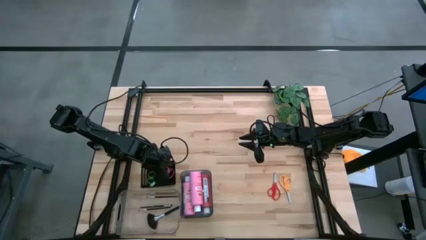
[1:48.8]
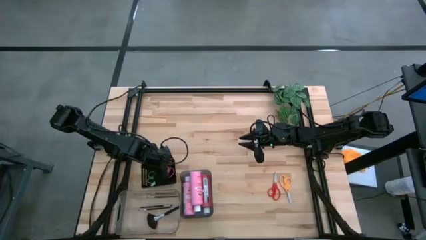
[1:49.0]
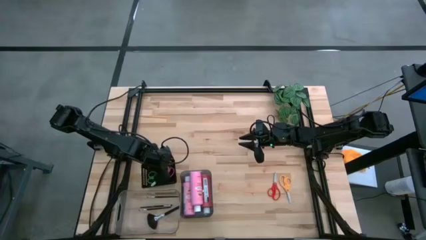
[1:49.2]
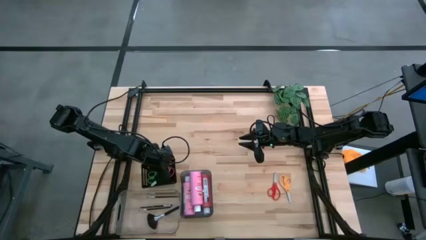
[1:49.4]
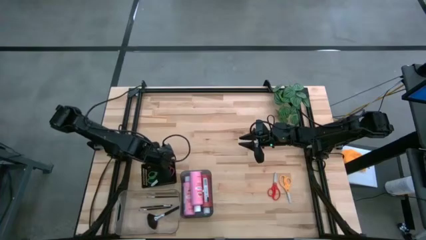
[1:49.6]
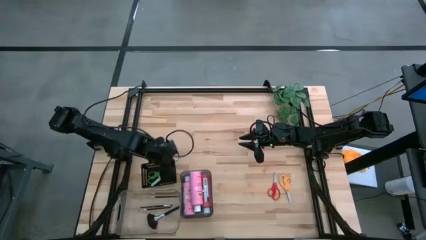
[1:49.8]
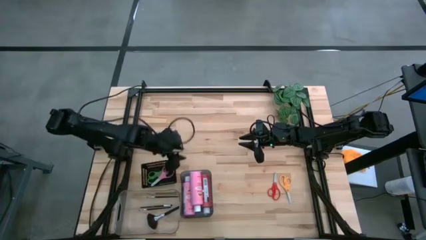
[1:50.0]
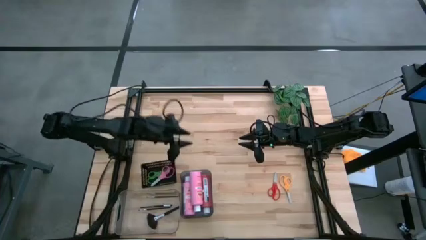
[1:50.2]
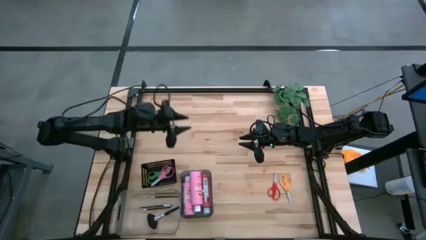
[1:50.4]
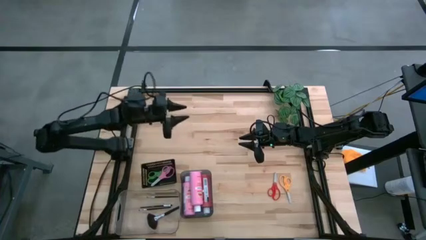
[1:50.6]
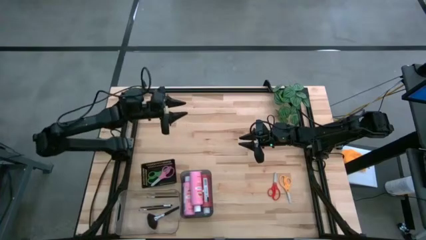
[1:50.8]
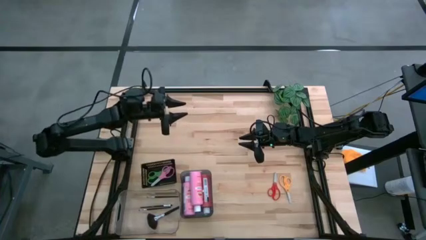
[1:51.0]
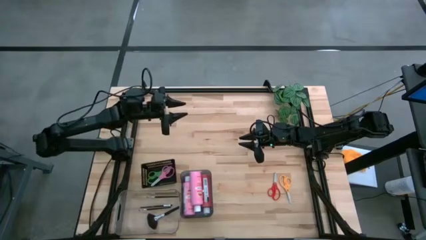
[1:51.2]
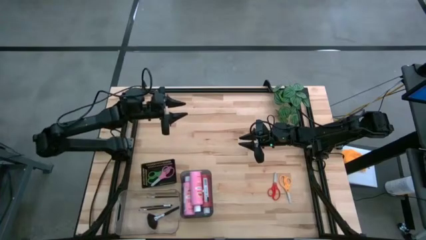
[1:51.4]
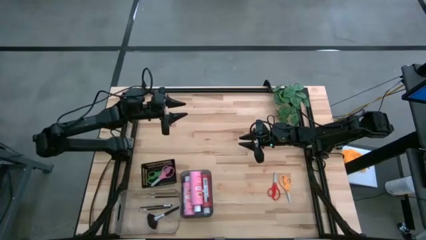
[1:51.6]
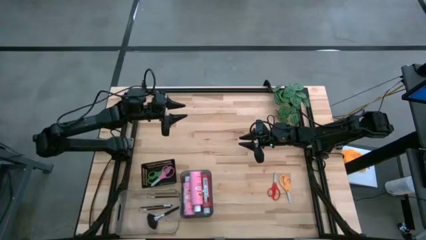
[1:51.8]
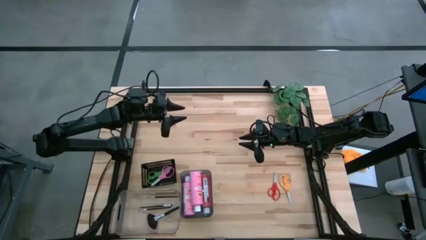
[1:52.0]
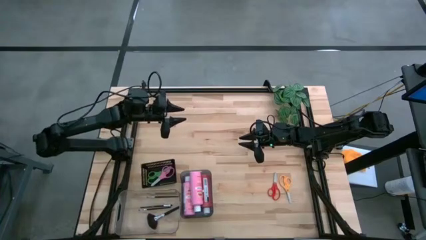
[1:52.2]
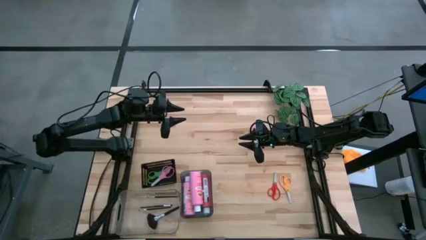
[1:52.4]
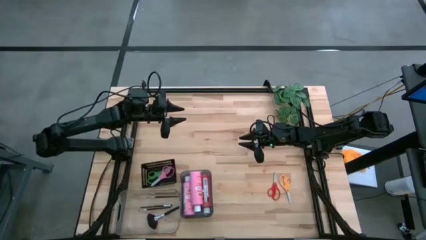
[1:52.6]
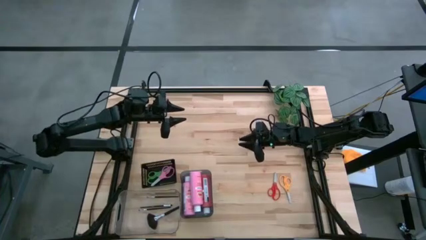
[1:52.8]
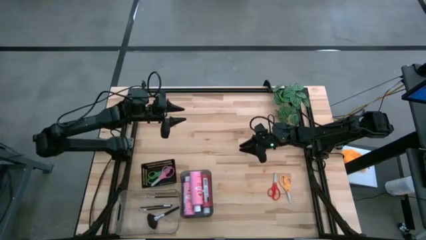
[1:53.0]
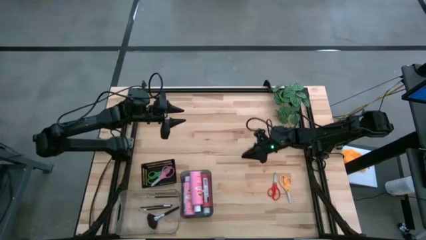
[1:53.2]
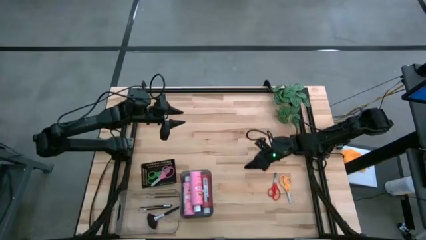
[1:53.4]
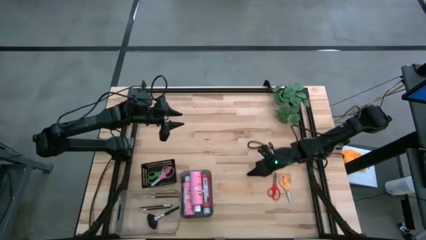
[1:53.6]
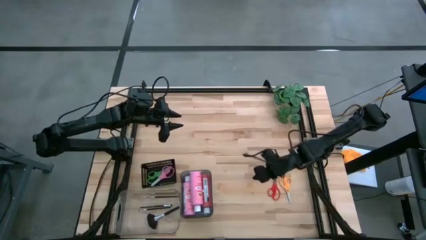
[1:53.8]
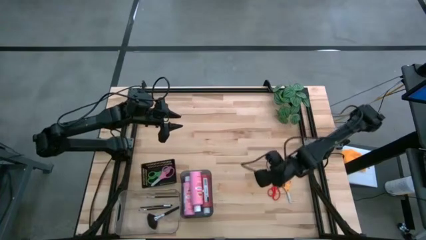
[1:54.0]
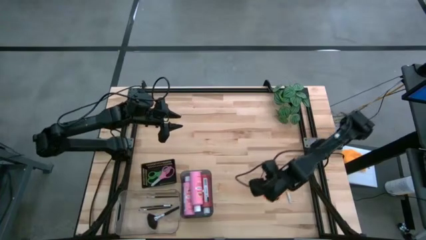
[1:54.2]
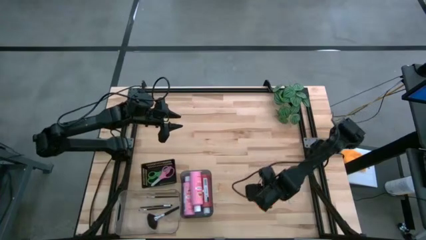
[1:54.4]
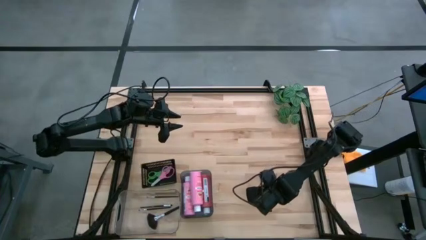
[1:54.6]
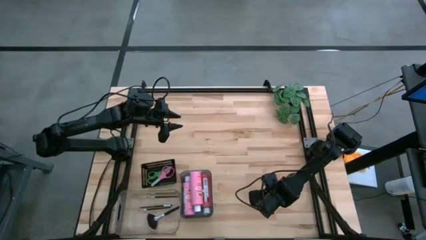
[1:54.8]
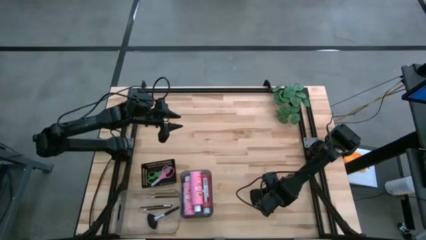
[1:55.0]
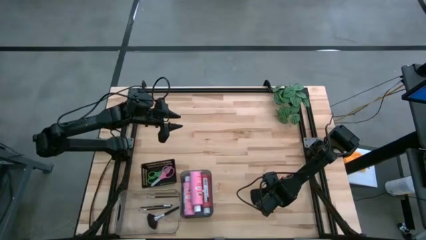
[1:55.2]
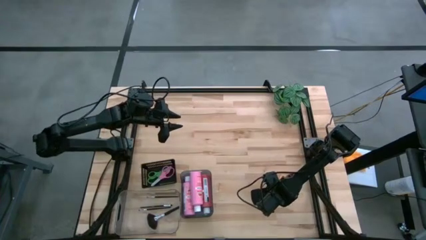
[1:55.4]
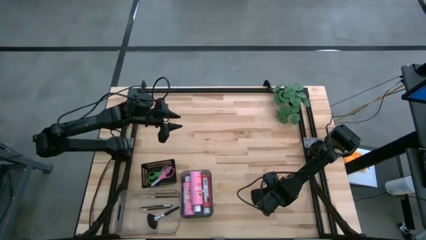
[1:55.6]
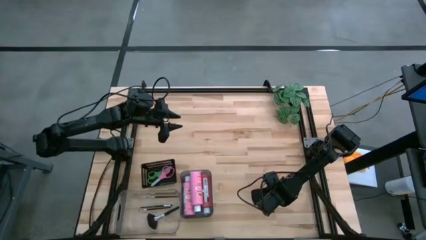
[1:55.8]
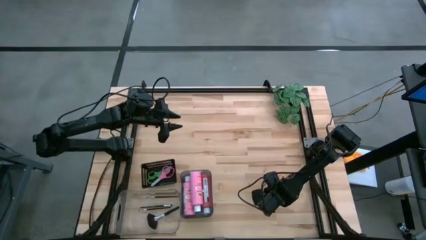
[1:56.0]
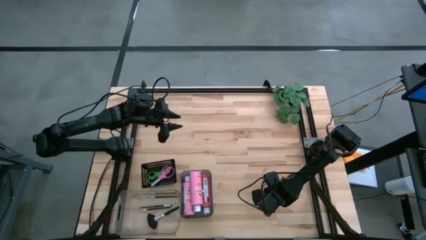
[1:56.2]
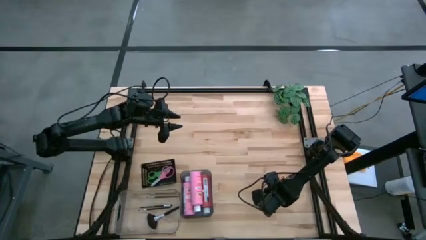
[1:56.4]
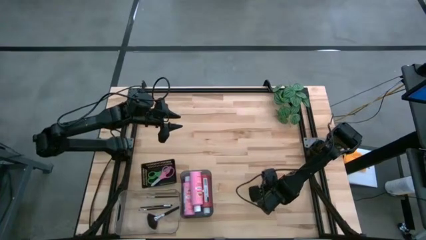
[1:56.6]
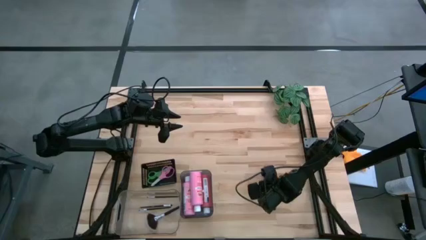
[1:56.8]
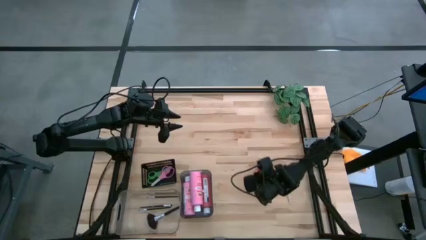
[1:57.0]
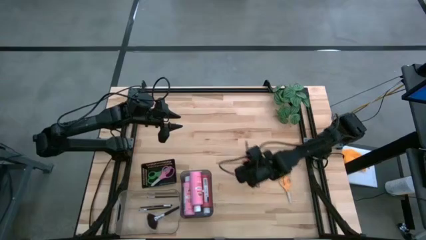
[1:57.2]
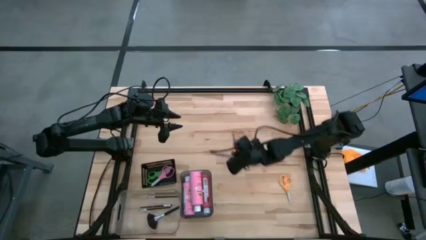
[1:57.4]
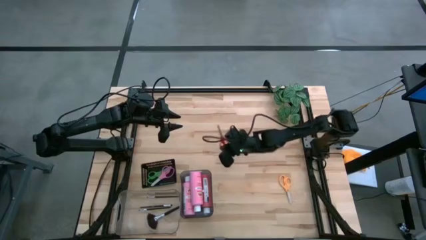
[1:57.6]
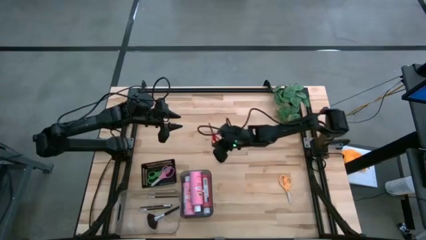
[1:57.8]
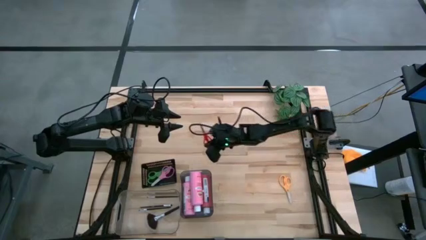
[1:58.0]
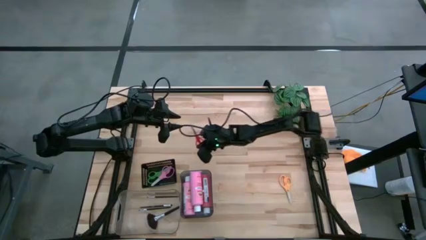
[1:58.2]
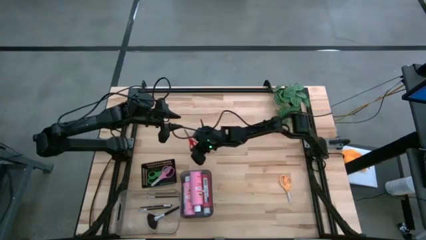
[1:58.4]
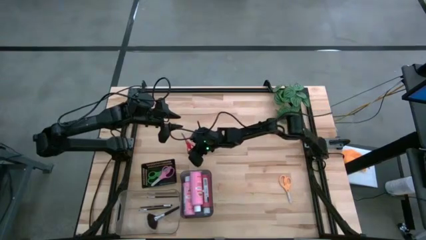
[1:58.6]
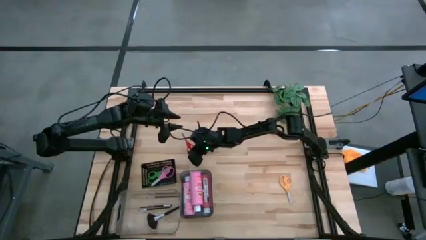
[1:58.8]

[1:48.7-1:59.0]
Task: Pick & Place Paint Supplies
Put the red scissors into the black bin

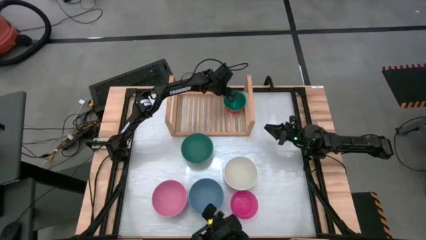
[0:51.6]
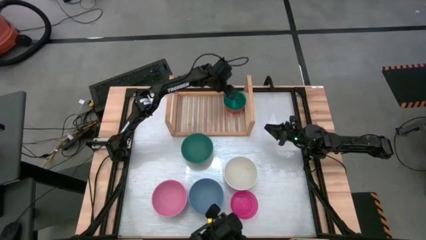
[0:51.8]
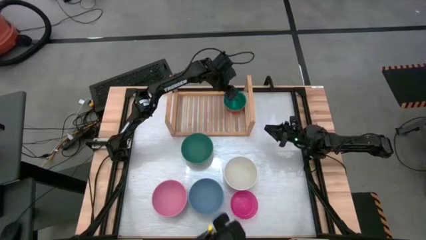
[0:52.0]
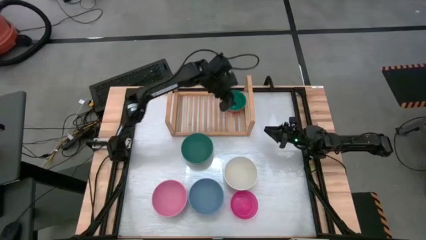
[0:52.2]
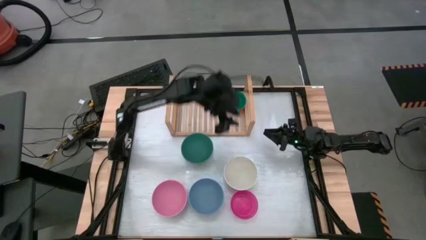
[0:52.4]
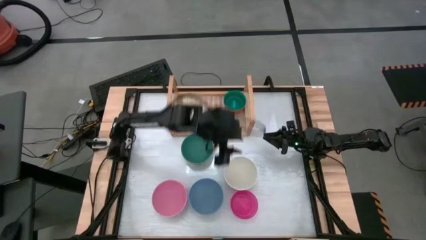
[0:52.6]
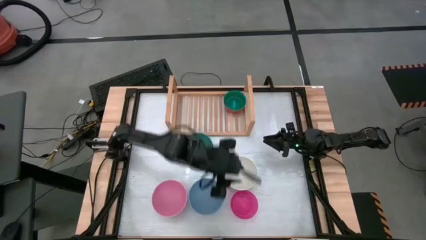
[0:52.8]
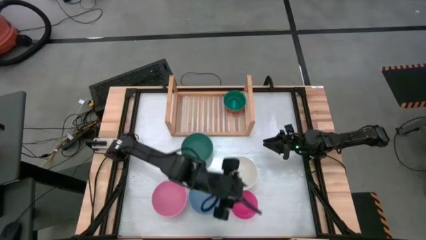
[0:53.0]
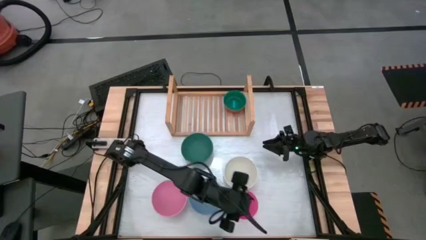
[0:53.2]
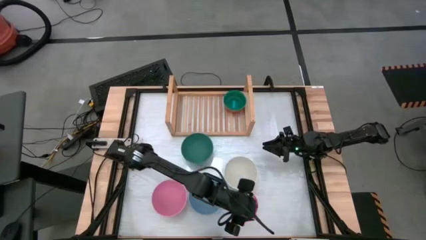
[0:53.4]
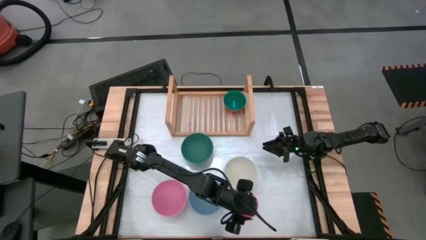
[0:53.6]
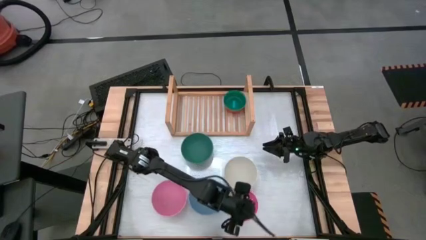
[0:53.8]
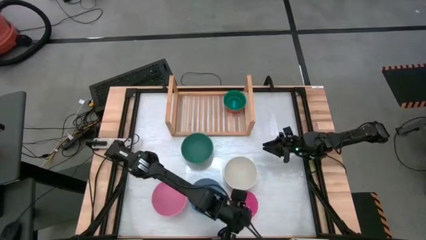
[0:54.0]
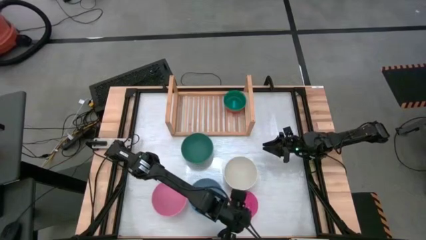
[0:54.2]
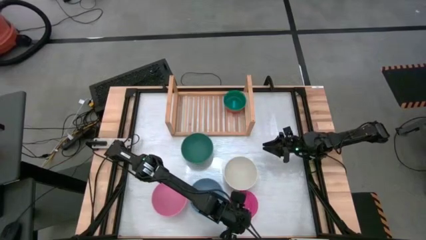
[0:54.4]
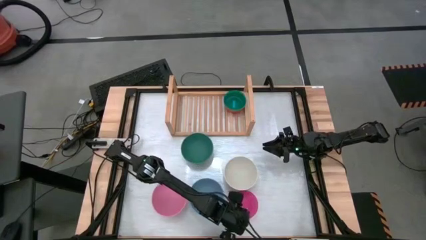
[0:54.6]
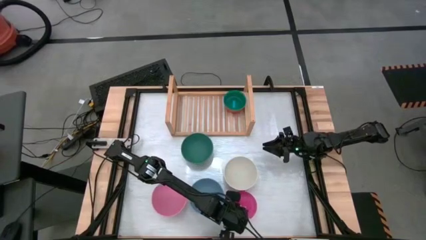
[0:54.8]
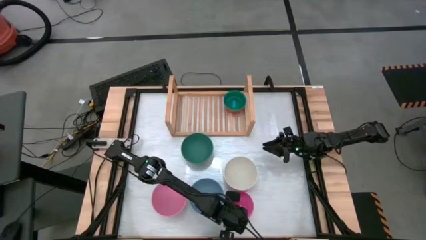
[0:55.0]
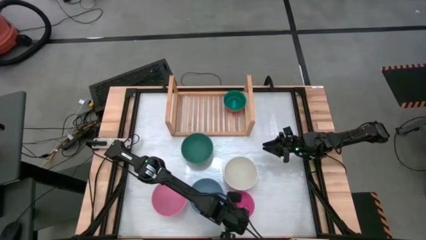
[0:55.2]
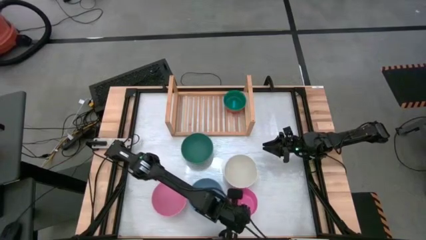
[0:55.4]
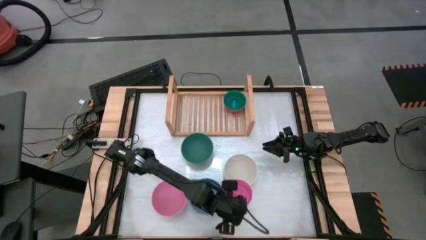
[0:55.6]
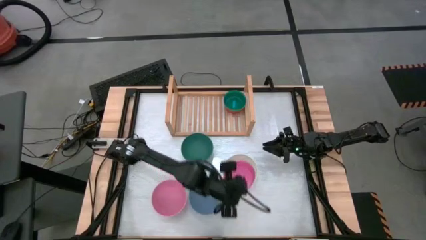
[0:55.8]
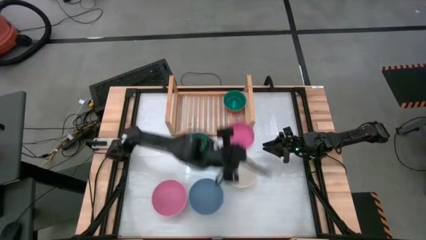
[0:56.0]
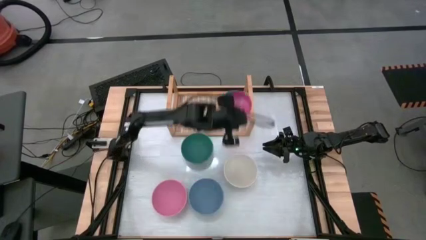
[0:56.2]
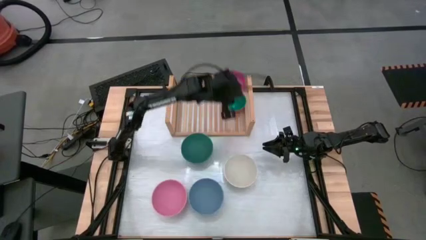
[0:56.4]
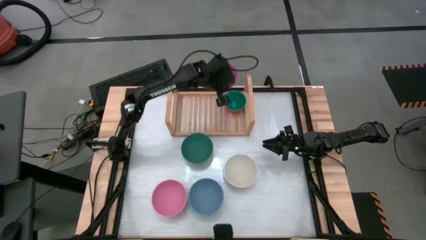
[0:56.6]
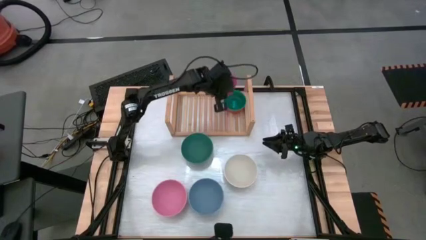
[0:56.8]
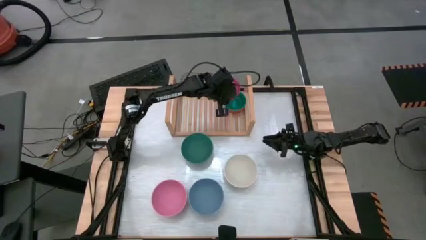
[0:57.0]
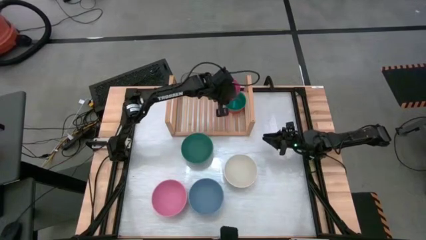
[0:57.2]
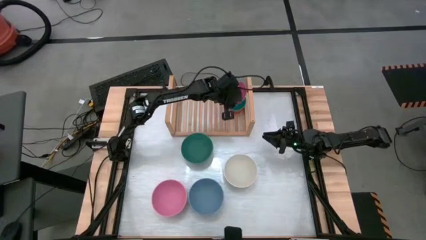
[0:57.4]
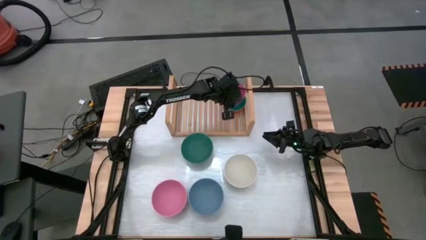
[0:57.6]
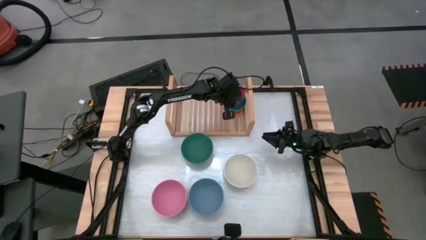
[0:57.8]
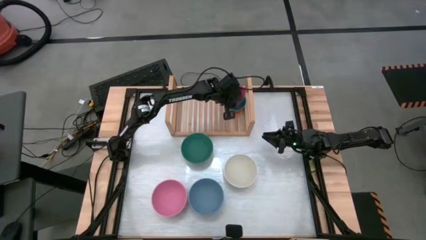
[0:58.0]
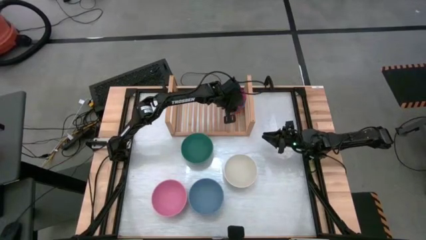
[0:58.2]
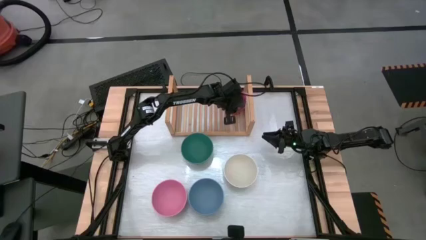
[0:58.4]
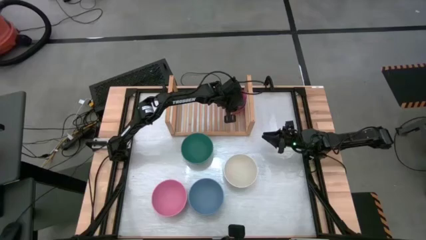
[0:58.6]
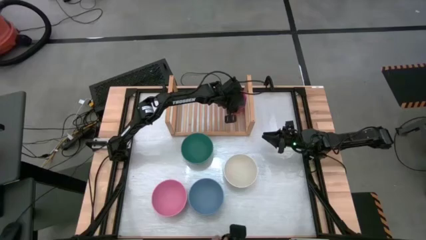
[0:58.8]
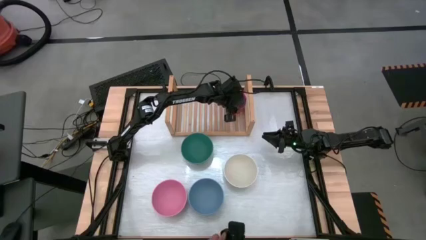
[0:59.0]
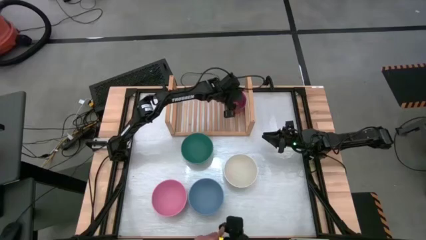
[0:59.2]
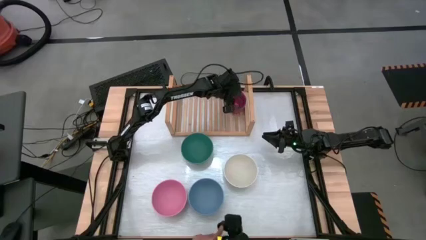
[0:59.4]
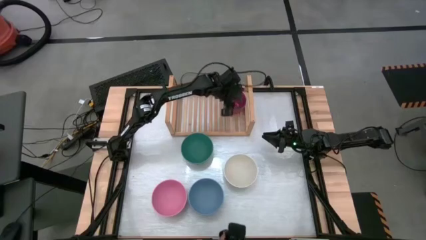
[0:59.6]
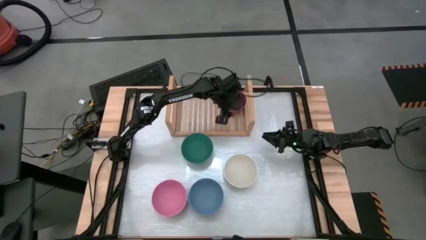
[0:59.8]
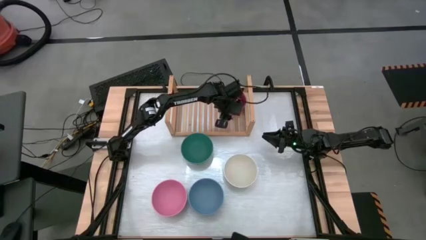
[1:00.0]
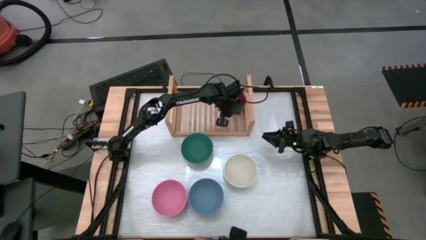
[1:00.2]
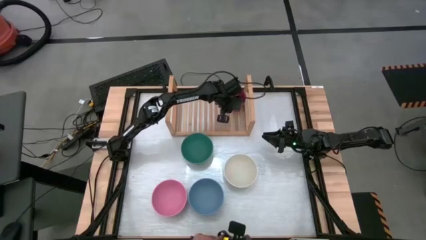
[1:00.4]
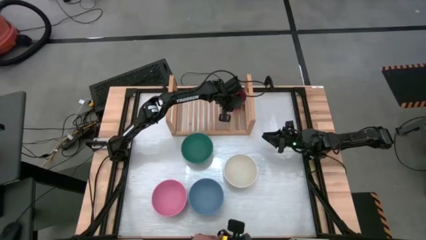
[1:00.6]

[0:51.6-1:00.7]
Task: Place and stack bowls onto a shelf
Stack the small light pink bowl on top of the small light blue bowl on the shelf
